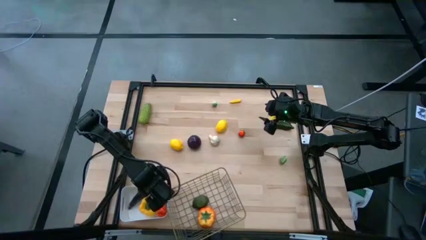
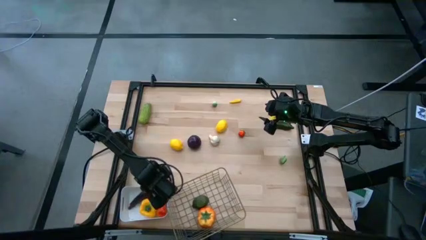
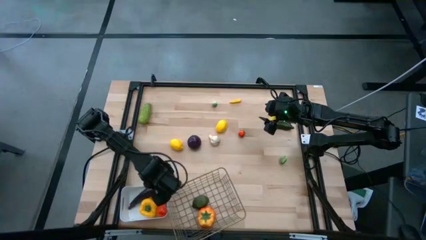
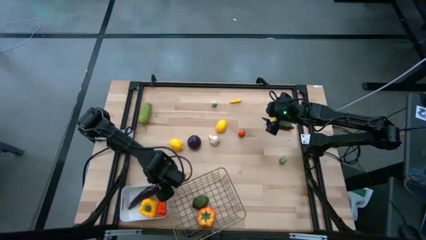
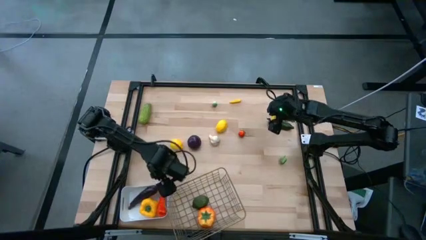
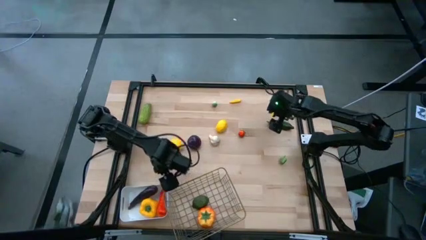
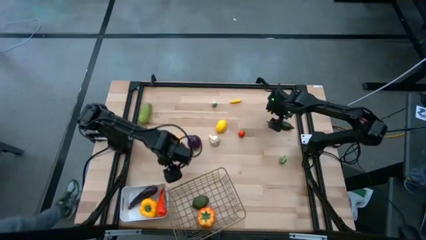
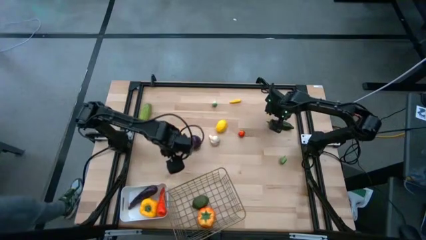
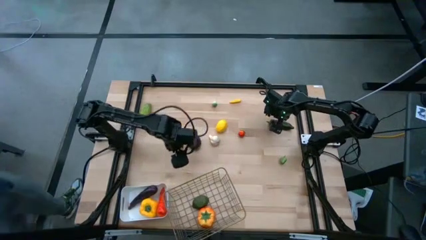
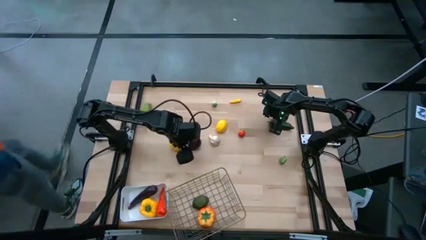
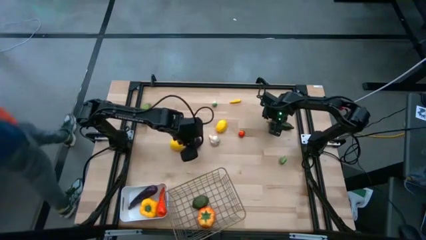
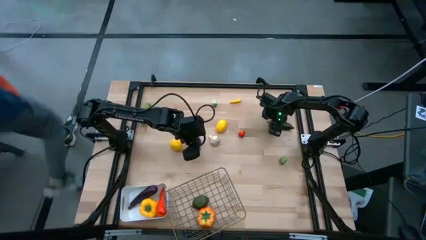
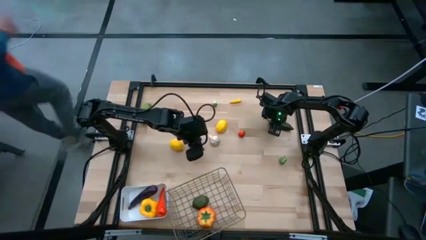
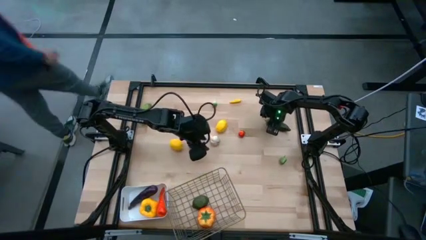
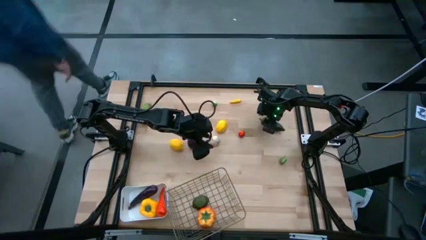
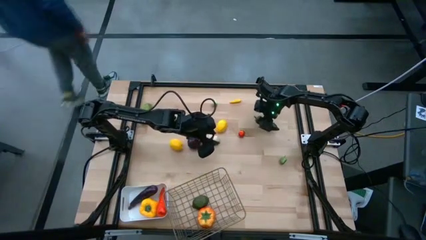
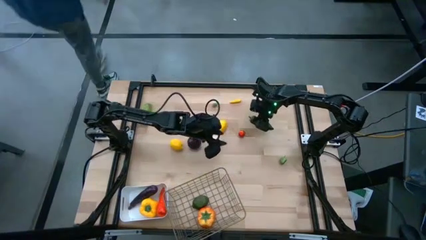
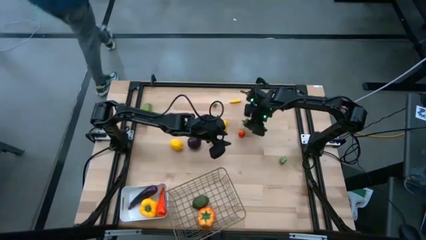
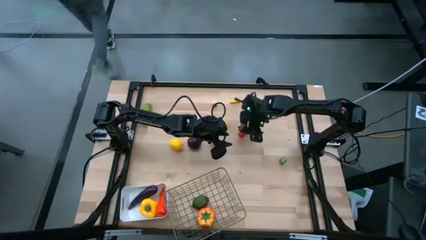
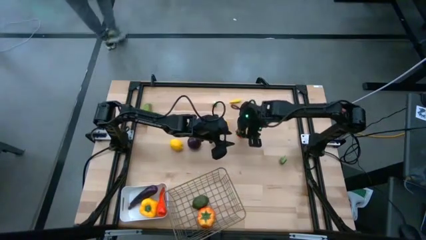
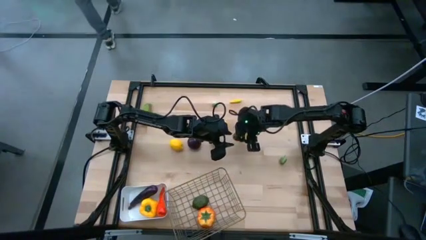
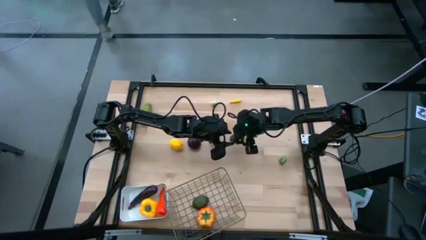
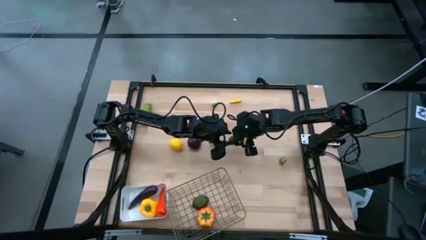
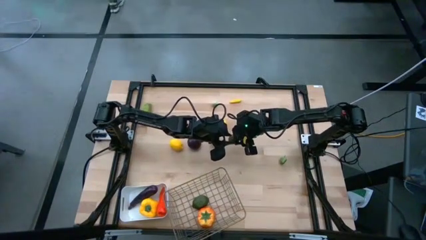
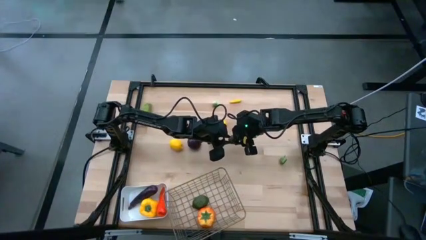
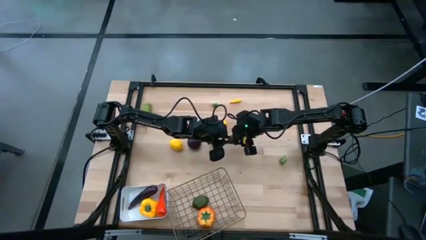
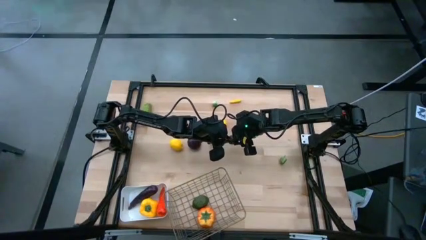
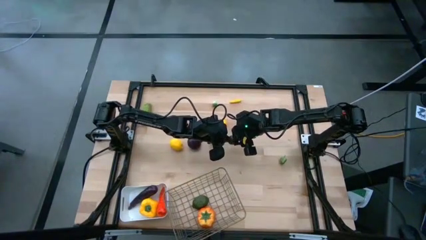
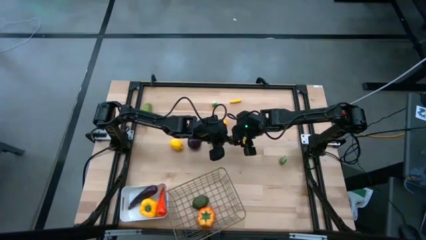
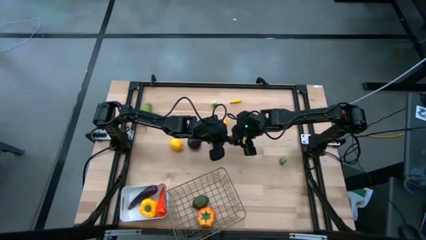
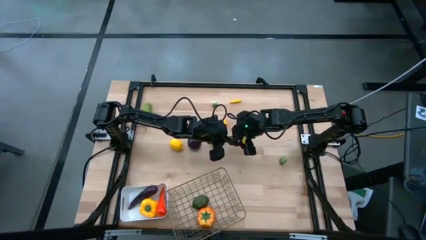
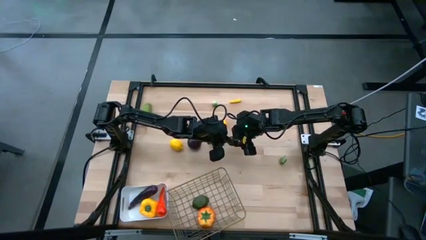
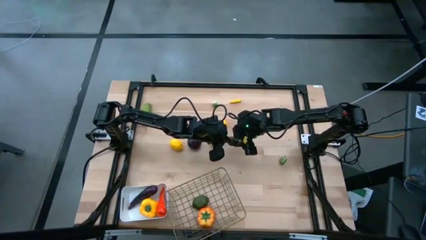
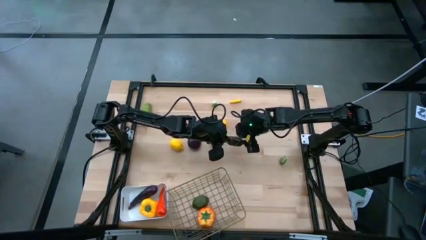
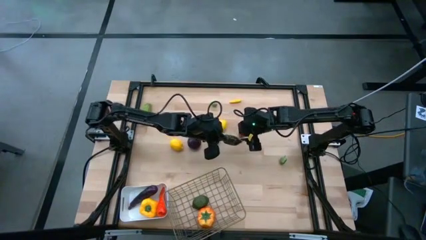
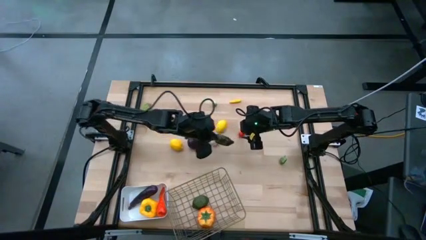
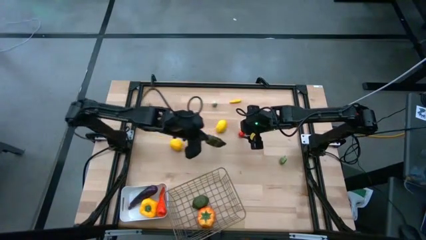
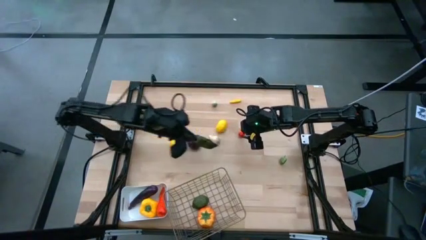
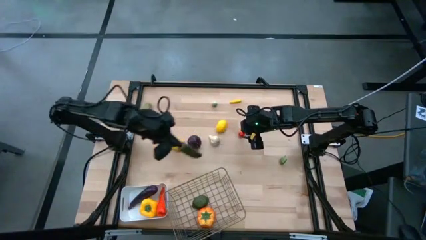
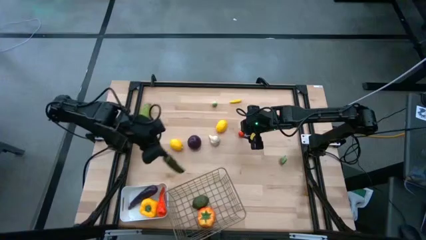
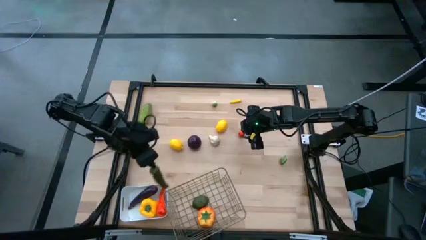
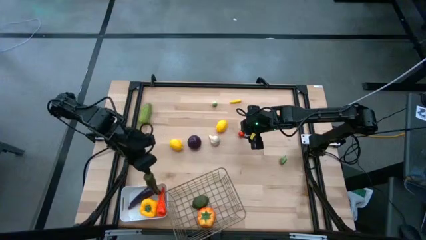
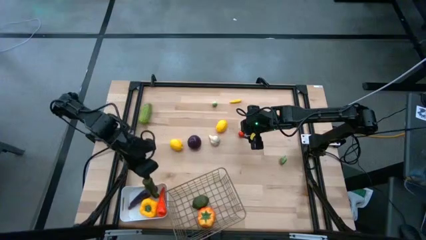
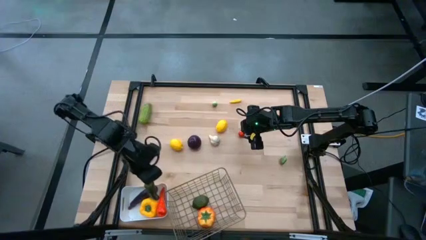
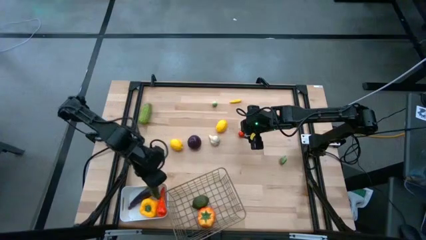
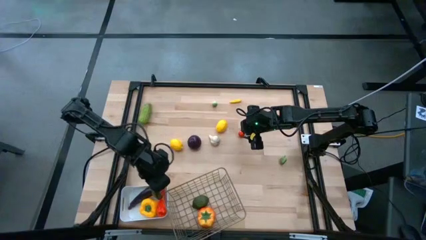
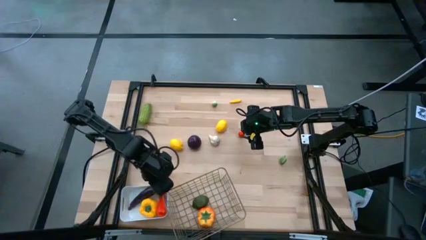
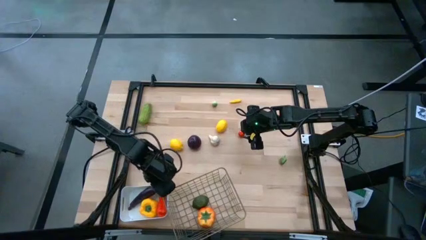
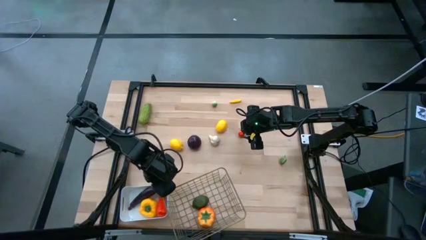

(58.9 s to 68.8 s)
Task: Sort produce into baskets
Put the green chili into the white basket

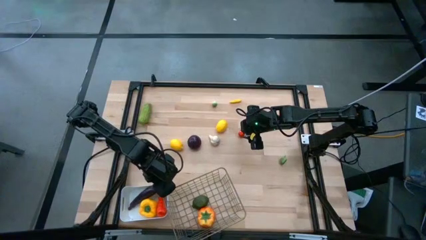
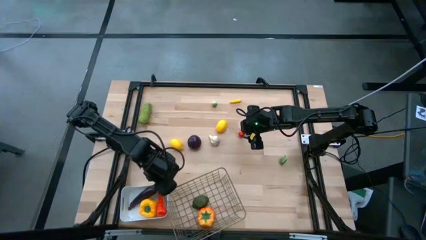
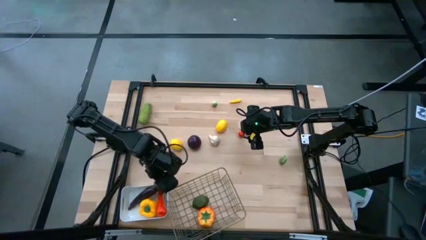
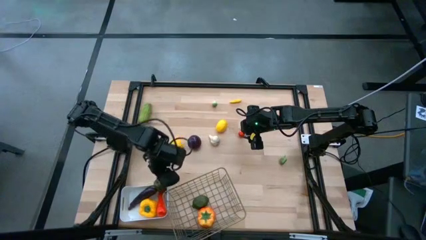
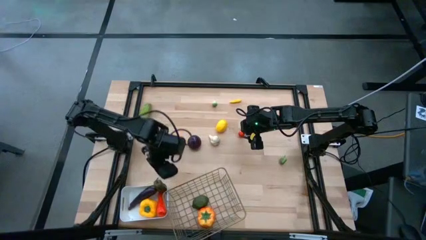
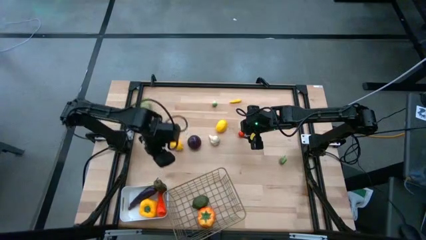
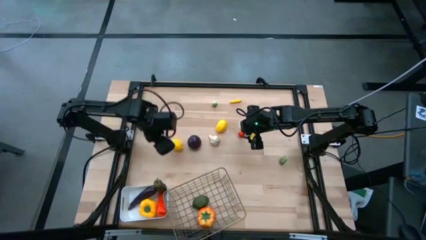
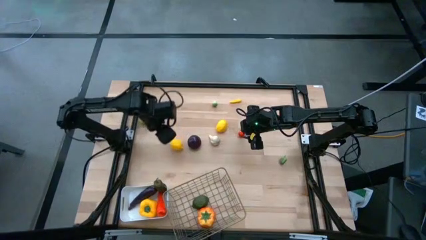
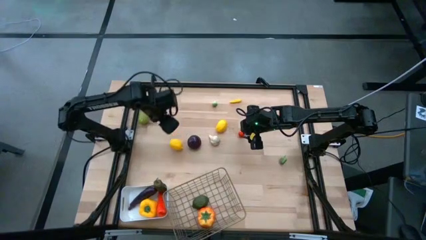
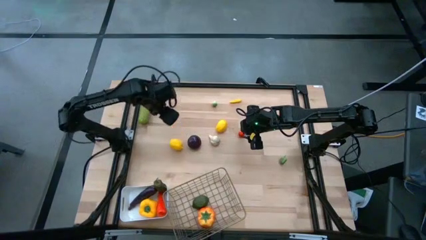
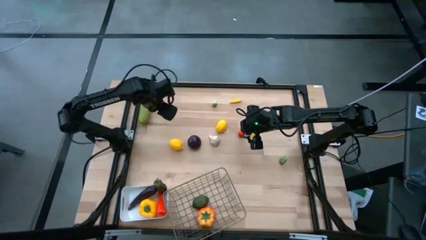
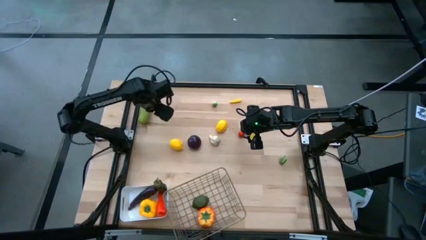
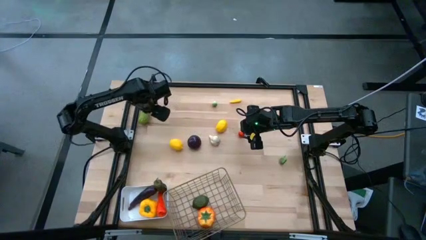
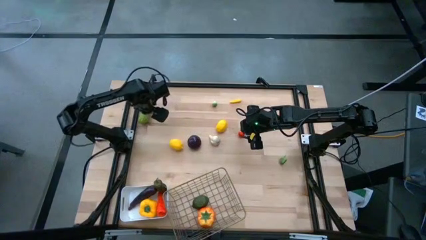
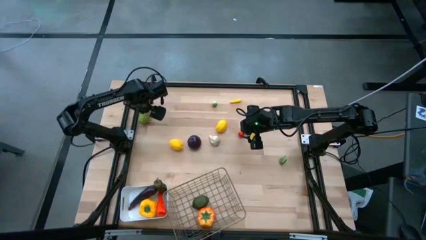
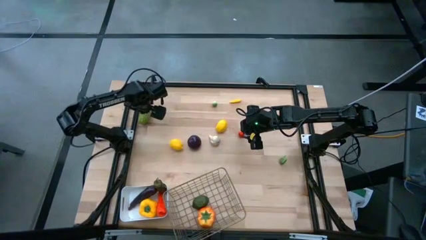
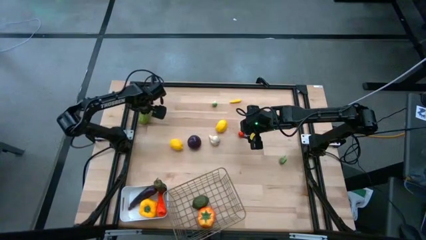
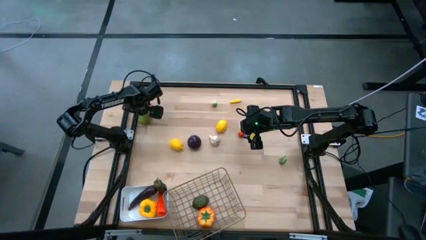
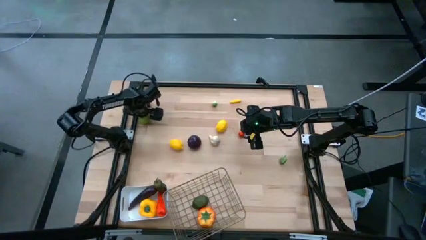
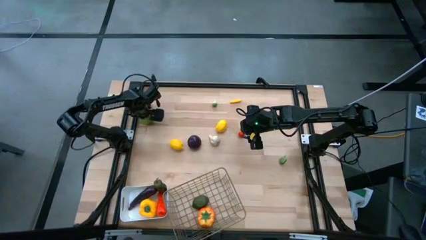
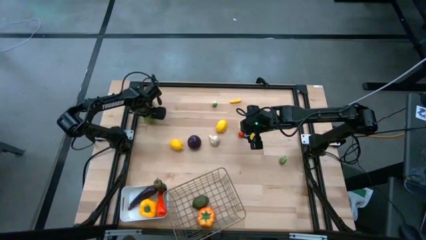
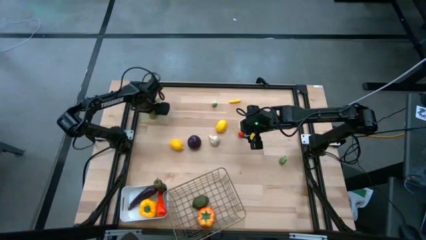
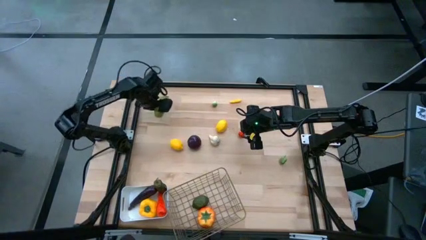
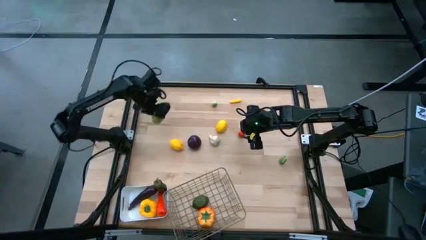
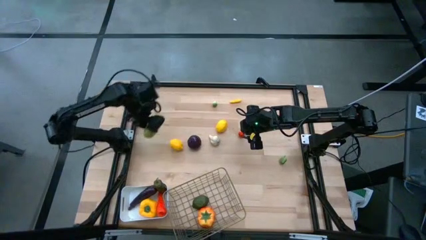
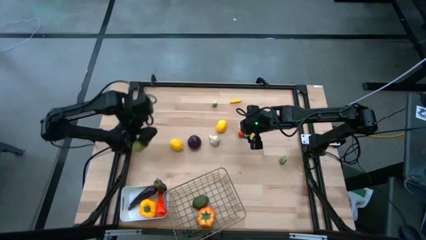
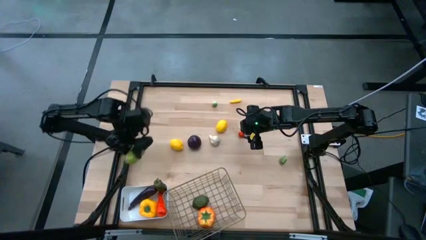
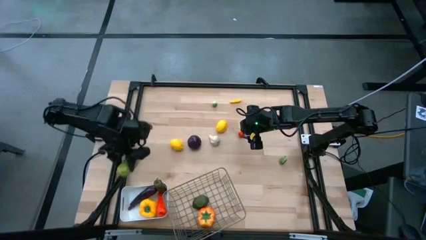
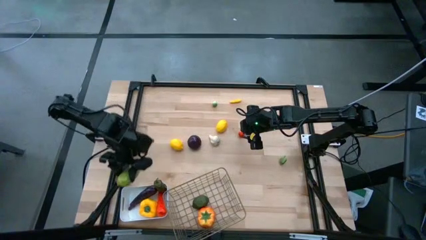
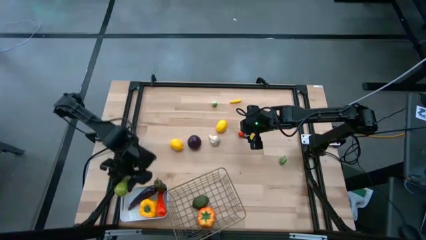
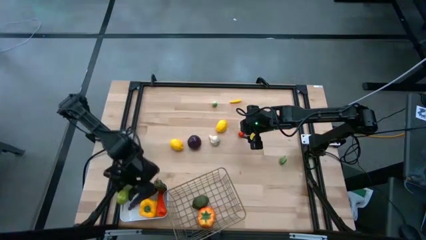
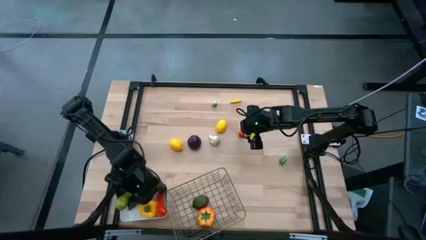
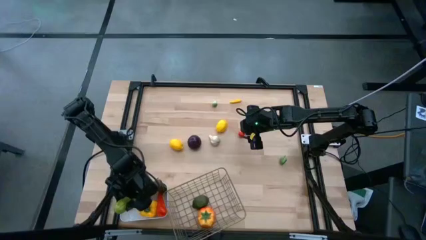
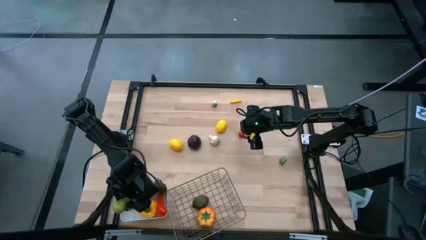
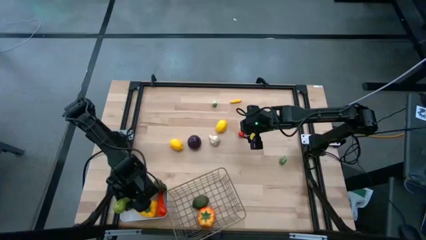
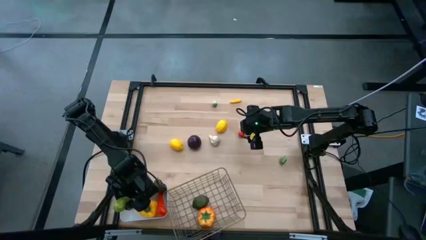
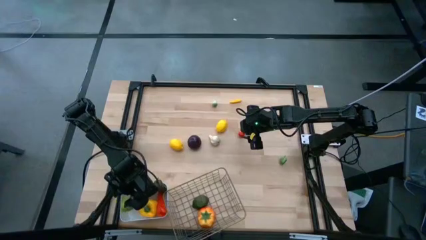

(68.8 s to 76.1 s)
Put the light green cucumber into the white bin
